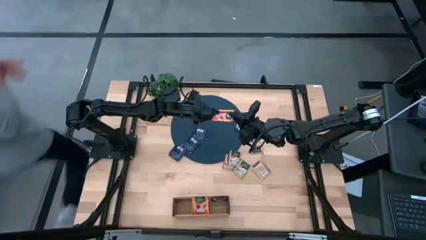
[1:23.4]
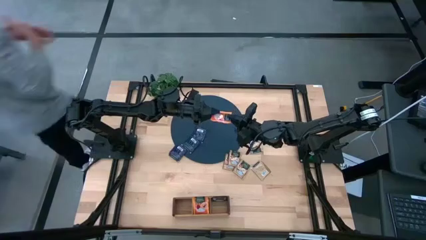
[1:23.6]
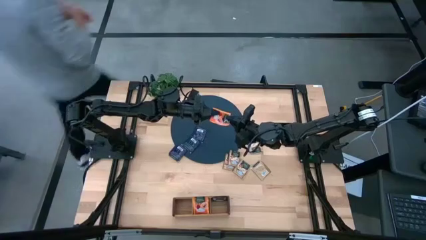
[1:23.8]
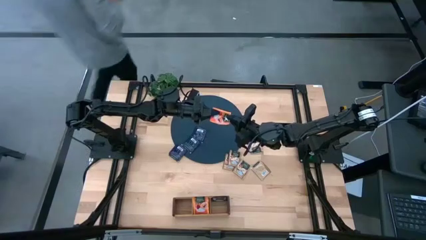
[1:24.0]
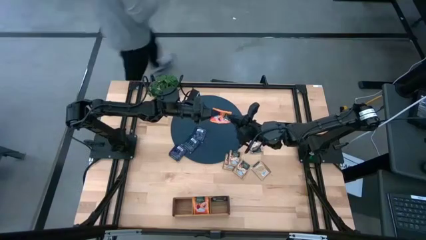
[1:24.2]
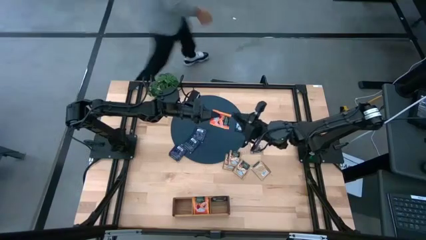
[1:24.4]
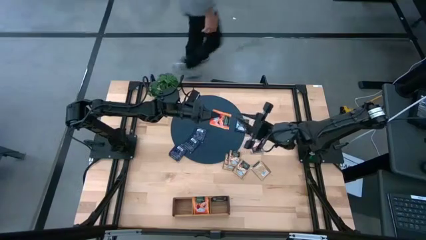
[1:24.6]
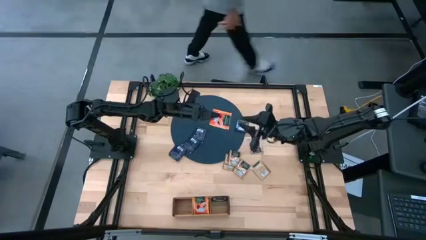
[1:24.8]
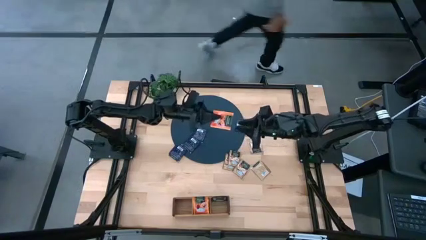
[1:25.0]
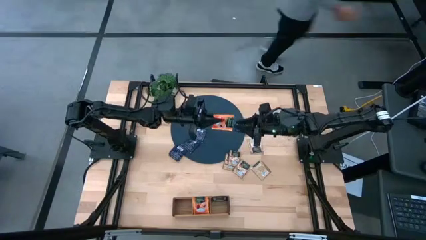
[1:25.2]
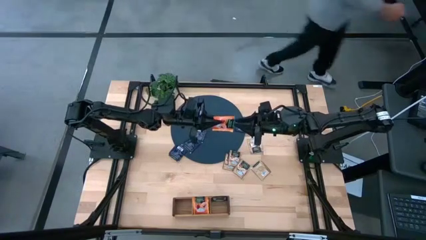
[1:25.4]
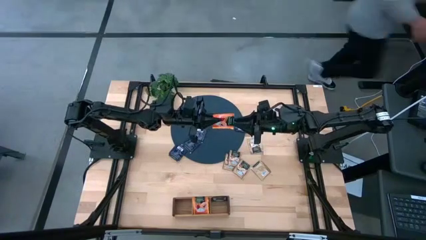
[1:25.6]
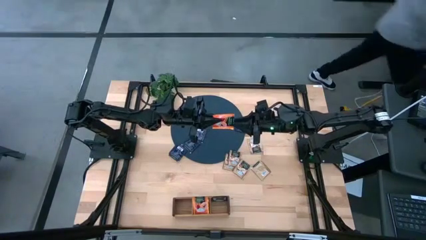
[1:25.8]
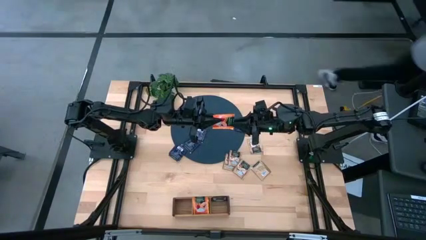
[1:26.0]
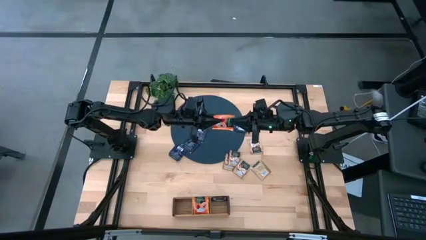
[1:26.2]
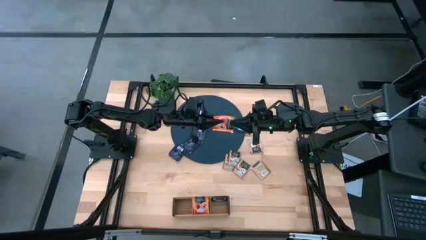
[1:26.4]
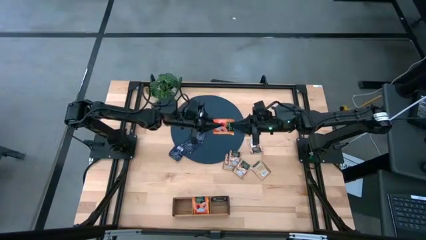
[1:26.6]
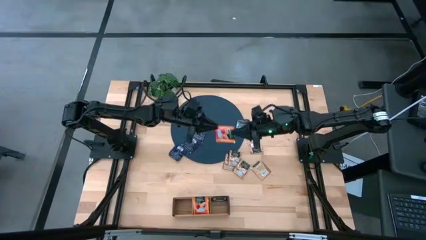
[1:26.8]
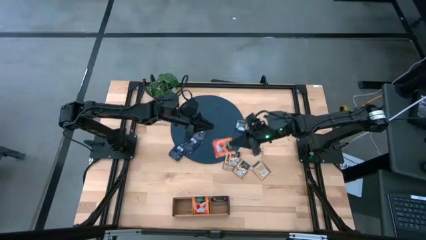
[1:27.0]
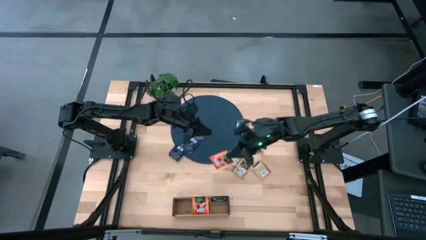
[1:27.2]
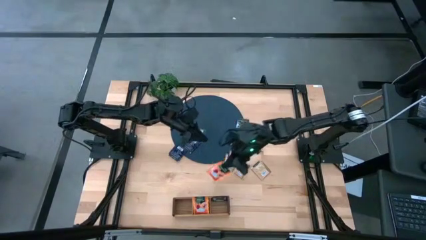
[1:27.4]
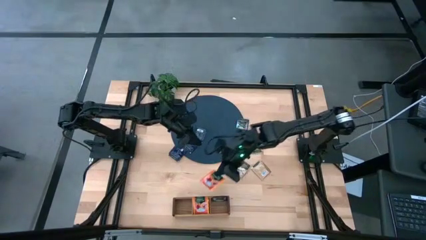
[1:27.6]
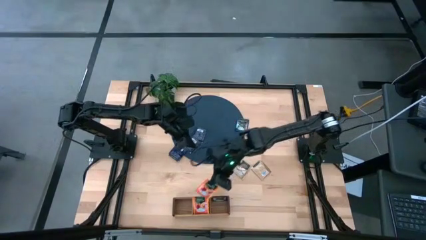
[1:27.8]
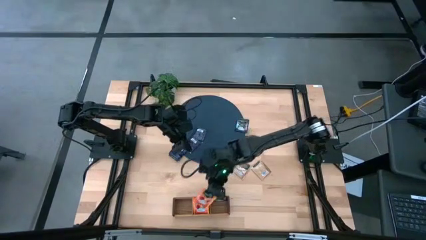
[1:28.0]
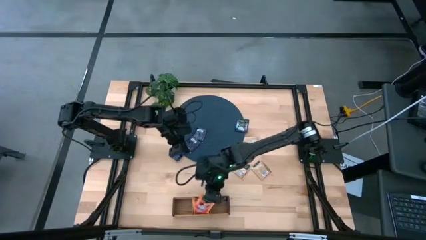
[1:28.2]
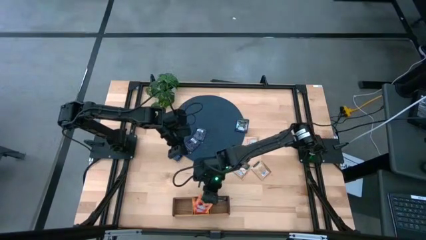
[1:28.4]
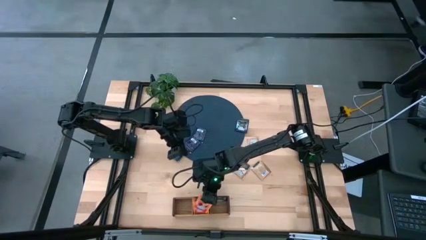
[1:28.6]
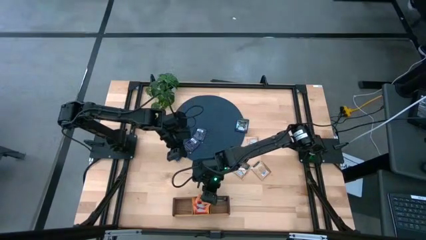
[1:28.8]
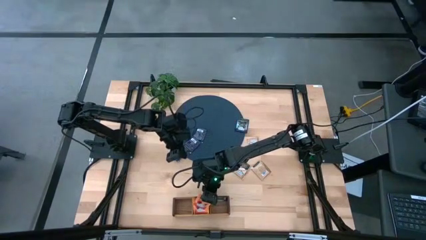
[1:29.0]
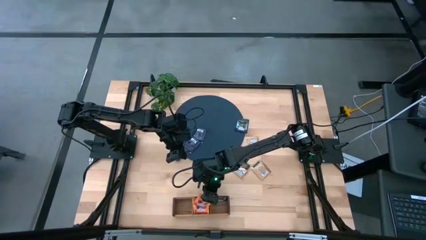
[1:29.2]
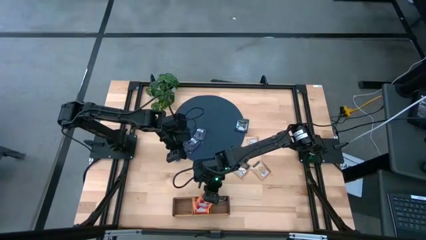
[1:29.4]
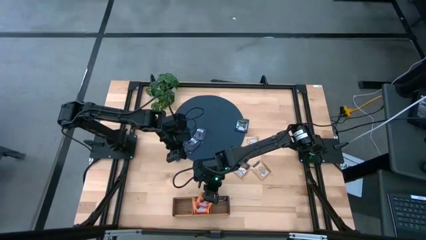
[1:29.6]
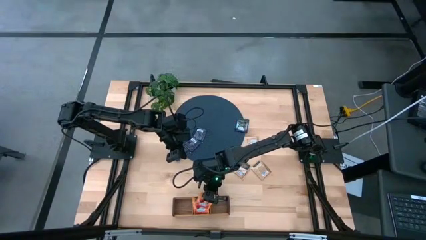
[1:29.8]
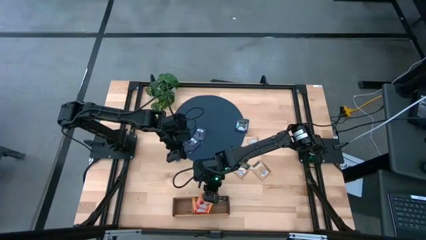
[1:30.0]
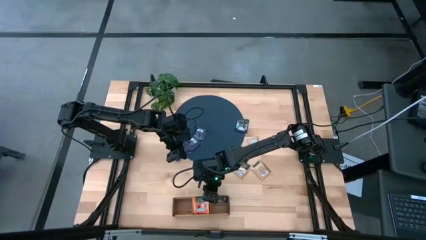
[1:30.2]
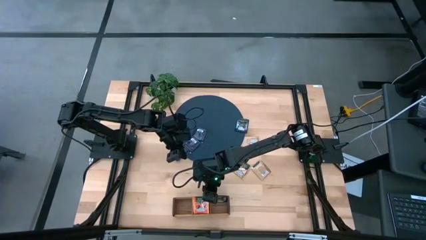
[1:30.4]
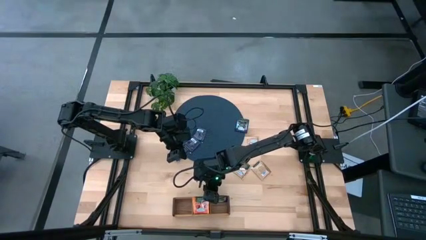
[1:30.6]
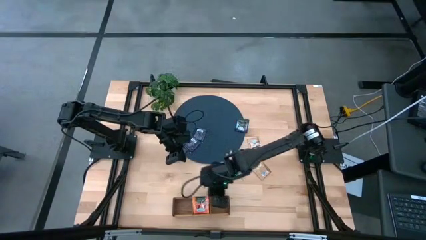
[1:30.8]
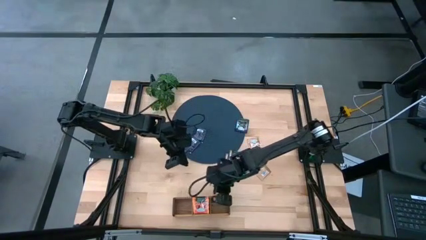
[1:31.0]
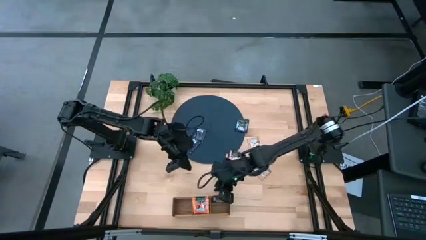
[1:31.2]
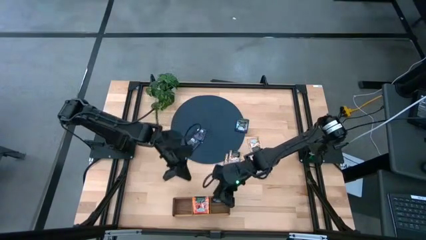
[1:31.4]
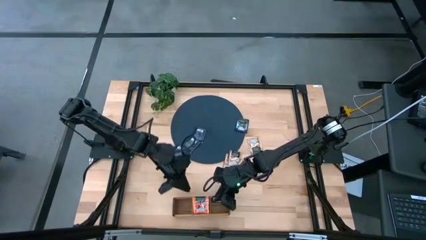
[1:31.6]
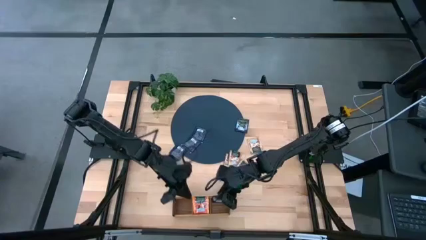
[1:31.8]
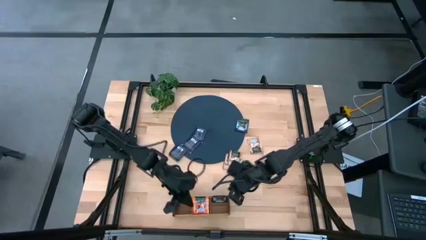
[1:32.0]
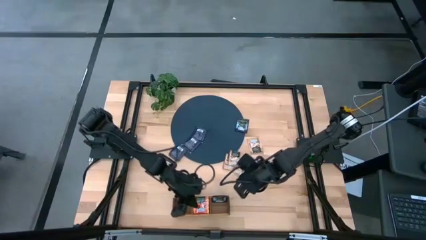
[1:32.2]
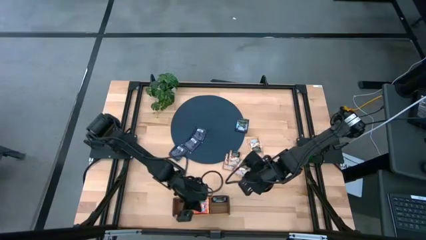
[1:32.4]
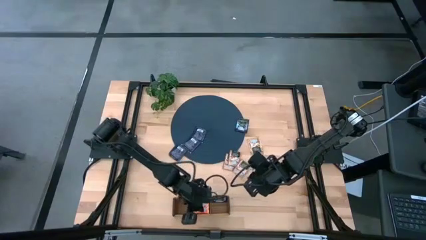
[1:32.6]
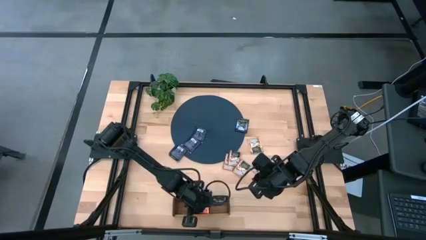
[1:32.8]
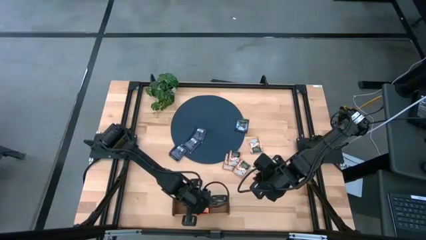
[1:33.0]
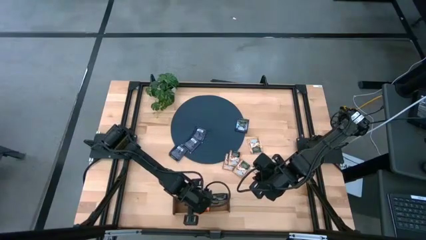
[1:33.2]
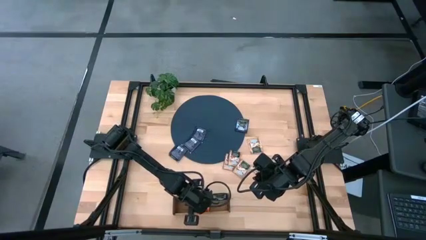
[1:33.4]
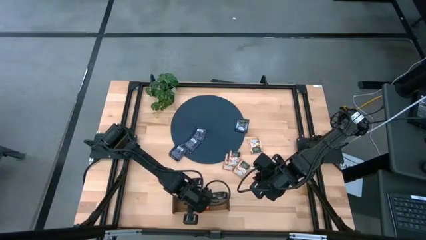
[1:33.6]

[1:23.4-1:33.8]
Task: Pick & Place Tea
Put the orange tea bag into the middle section of the wooden organizer

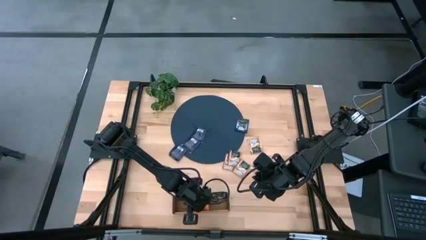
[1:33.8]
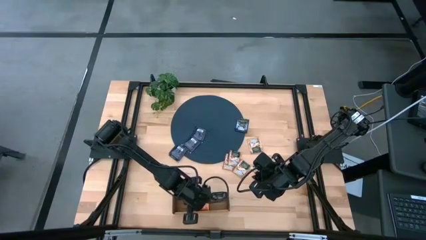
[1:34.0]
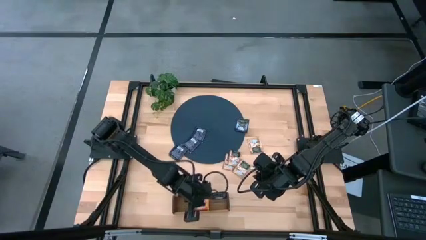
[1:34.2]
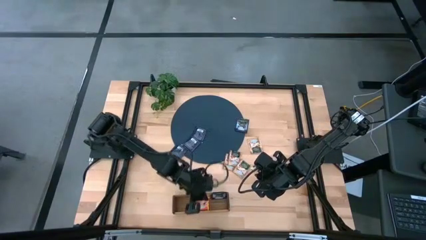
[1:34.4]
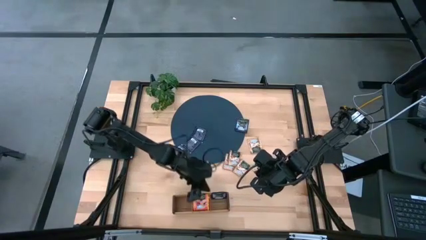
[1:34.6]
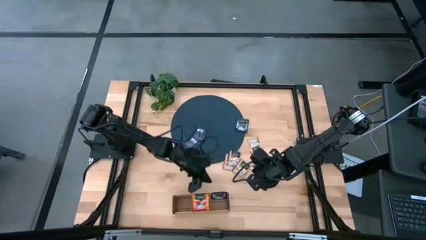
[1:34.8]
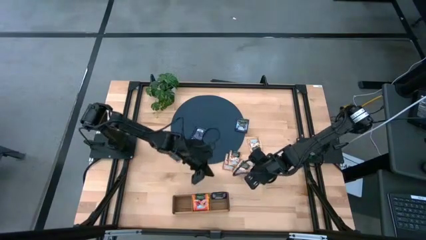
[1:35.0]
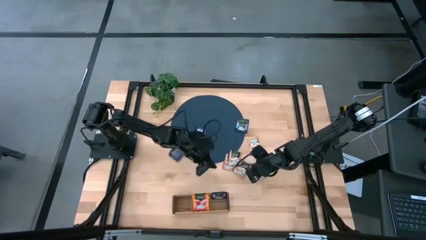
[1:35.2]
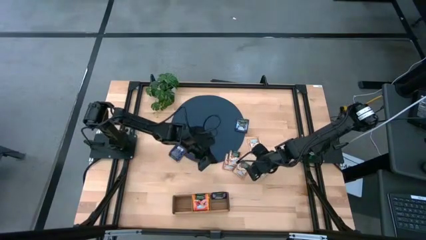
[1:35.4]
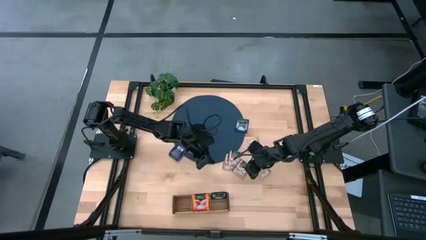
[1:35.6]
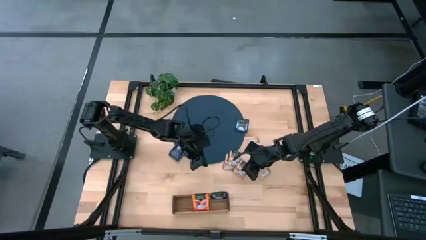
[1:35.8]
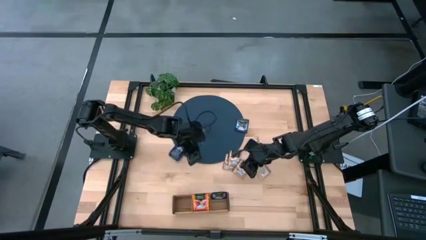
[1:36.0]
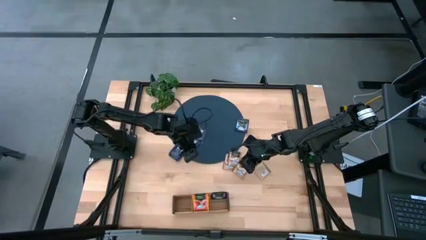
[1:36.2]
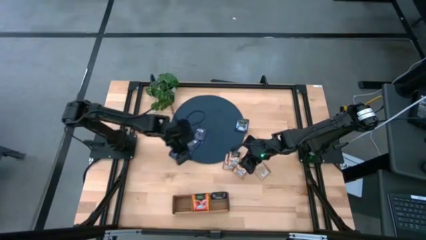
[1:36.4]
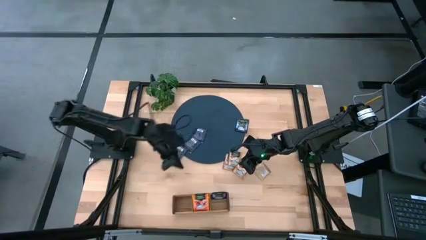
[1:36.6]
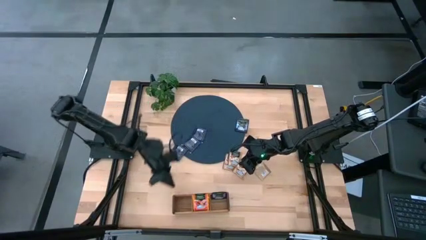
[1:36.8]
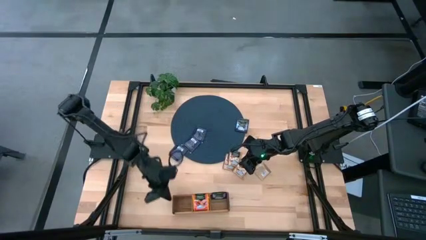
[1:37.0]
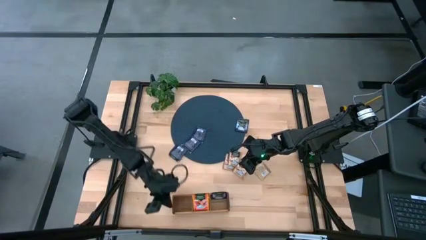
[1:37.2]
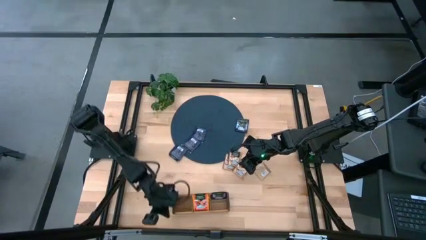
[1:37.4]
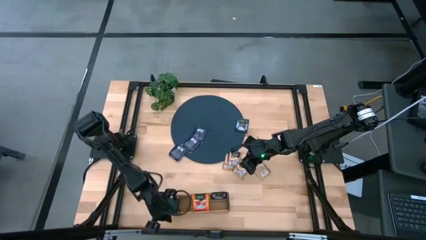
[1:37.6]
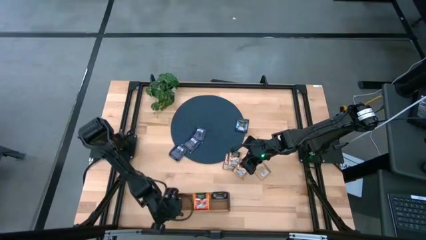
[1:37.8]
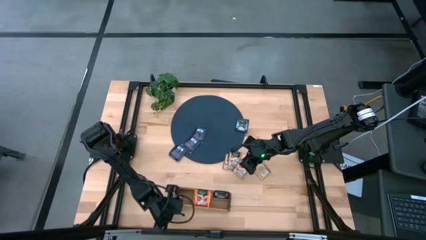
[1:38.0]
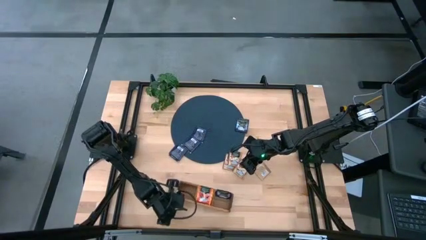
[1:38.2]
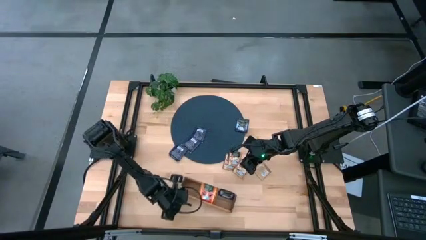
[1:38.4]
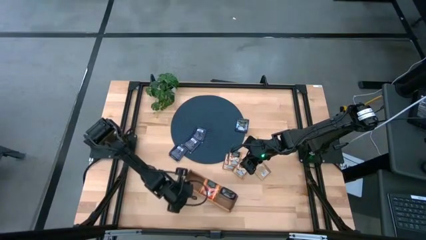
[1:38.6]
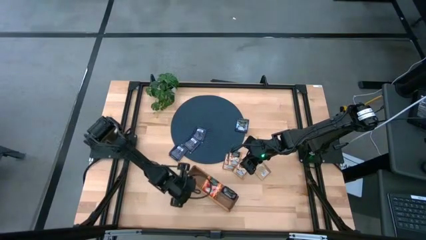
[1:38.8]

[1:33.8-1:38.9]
Move the wooden organizer closer to the tea bag

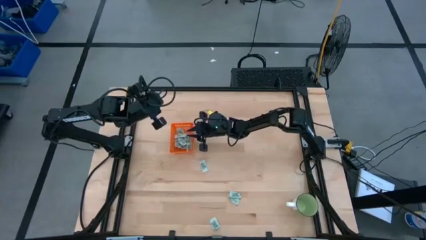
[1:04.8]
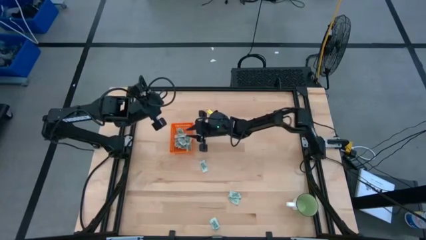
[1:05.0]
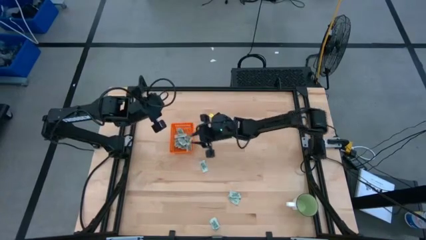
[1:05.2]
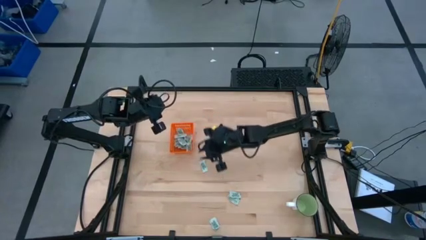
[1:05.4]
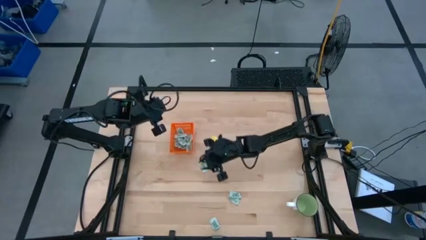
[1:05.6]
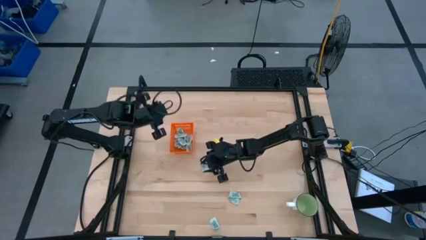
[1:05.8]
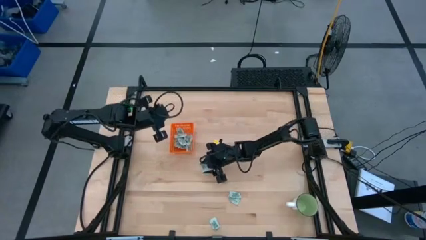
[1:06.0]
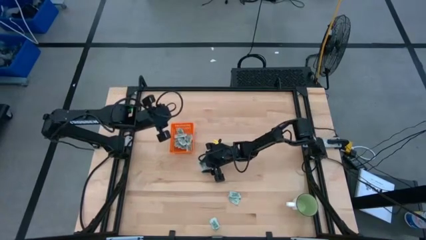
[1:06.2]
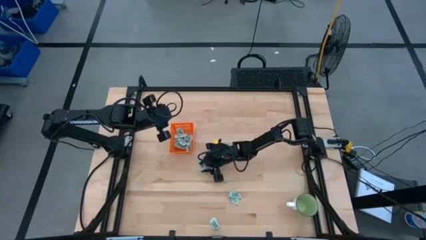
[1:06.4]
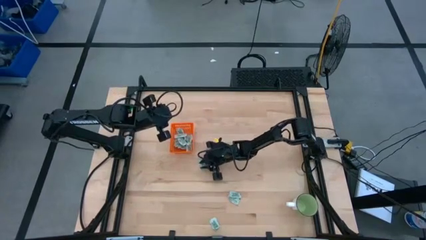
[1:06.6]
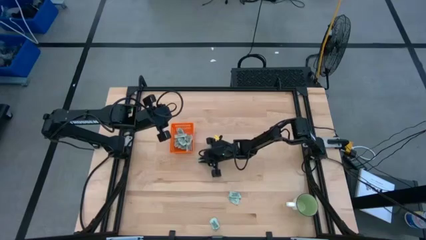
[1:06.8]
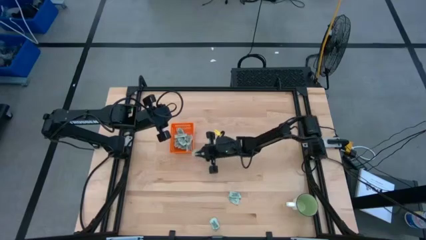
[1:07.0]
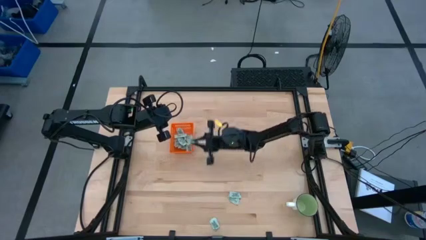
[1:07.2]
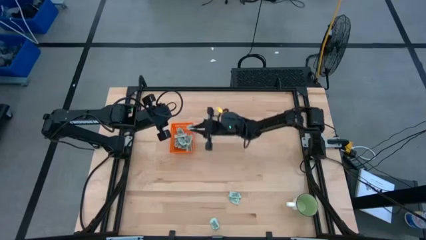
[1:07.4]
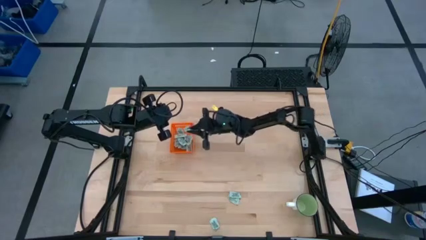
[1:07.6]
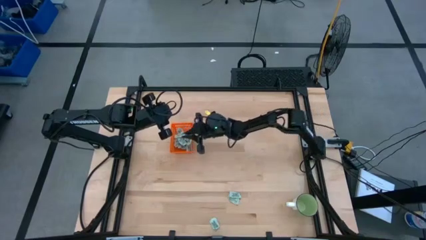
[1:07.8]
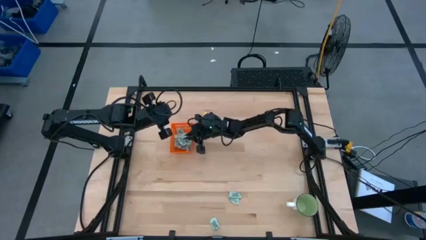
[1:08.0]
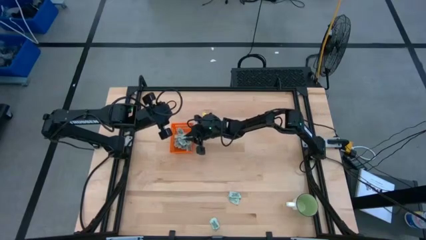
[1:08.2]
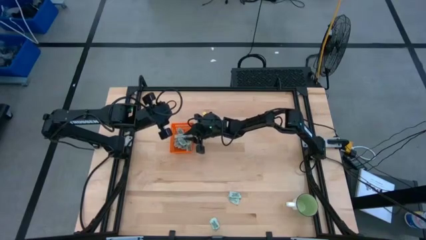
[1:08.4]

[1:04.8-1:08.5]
Task: Pick and place Stevia / Truvia into bins
Put the green stevia packet into the orange bin
